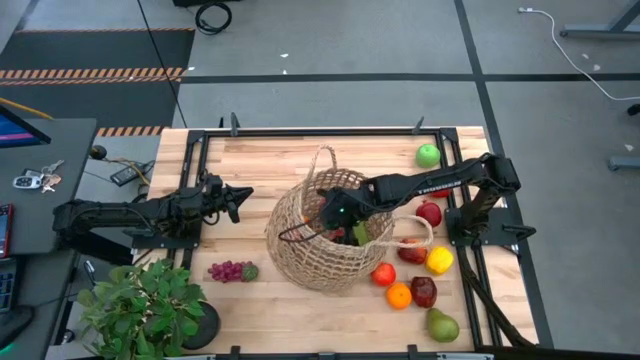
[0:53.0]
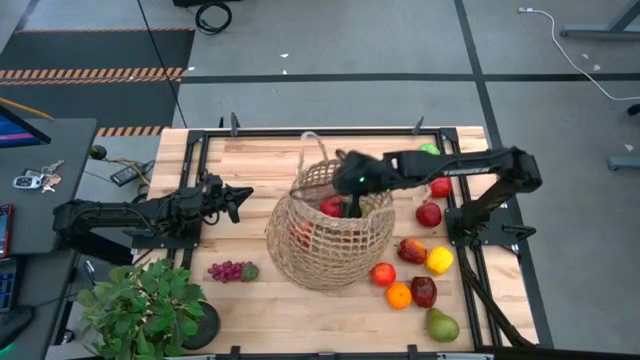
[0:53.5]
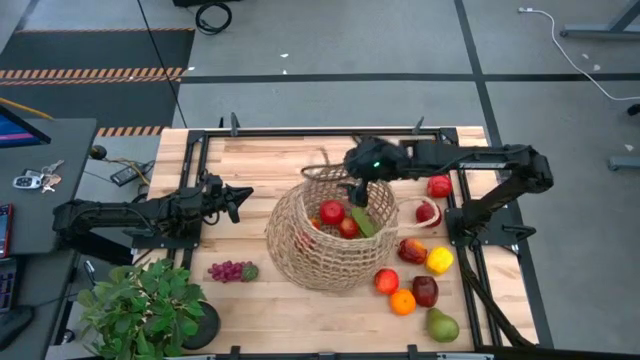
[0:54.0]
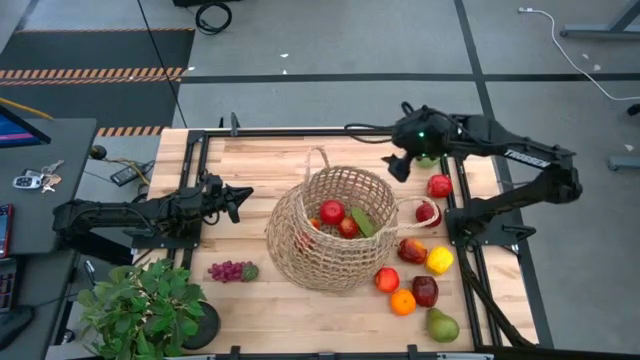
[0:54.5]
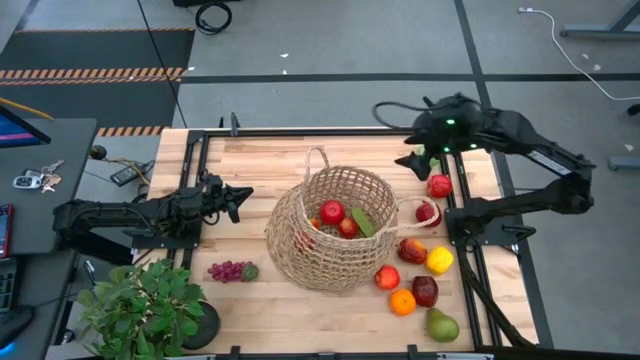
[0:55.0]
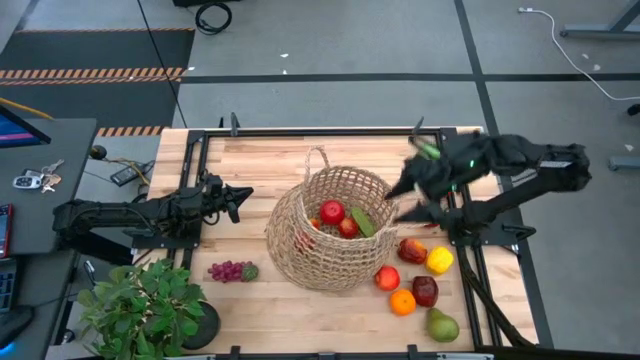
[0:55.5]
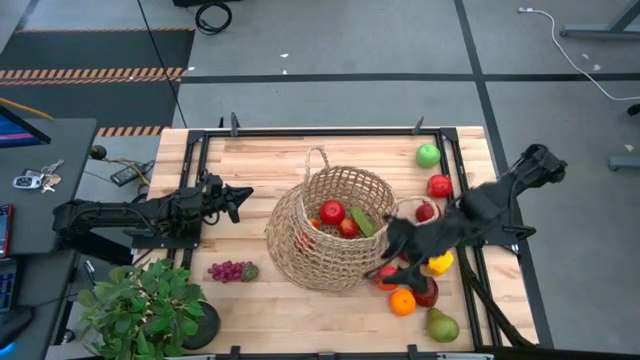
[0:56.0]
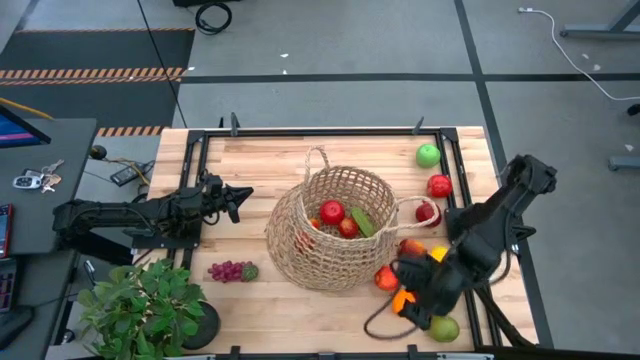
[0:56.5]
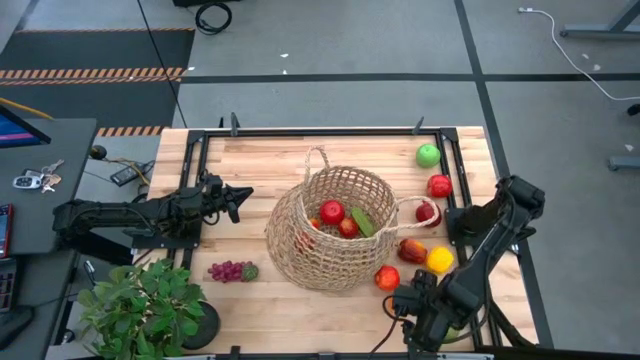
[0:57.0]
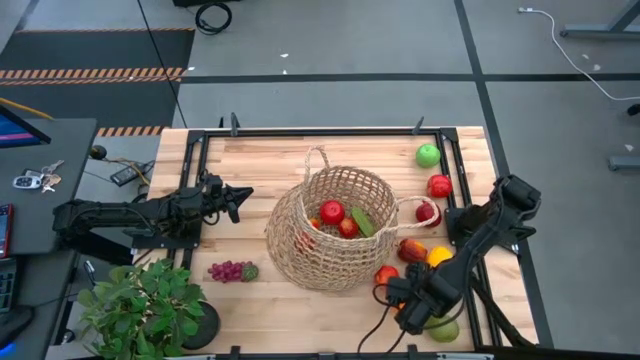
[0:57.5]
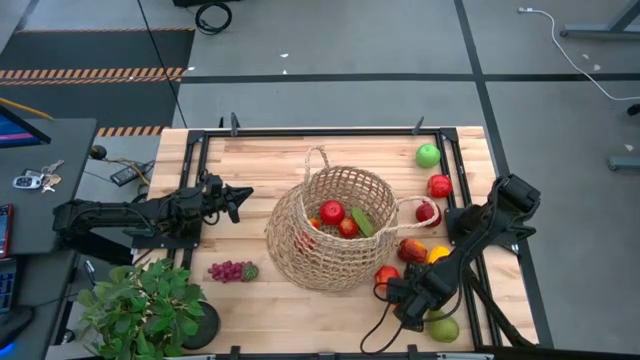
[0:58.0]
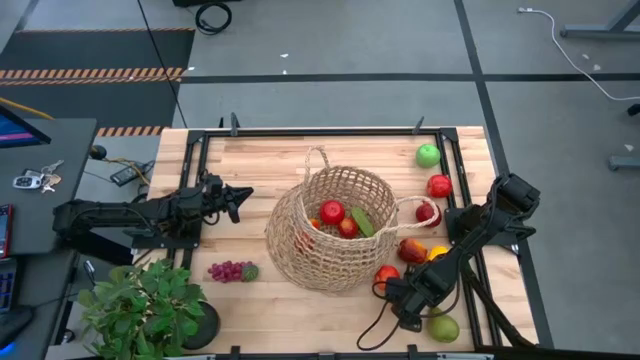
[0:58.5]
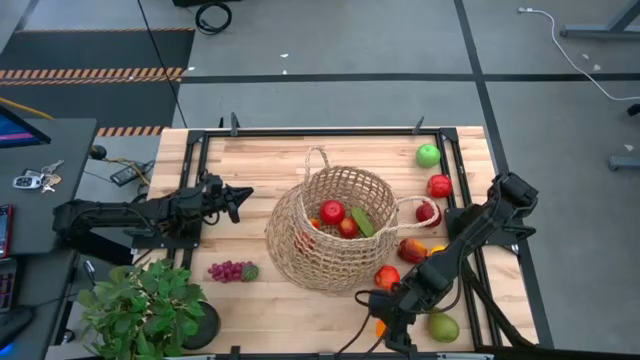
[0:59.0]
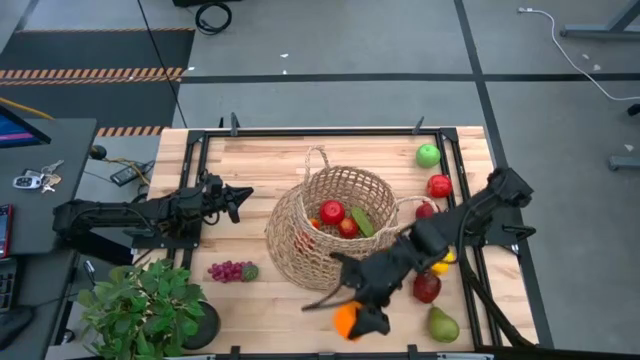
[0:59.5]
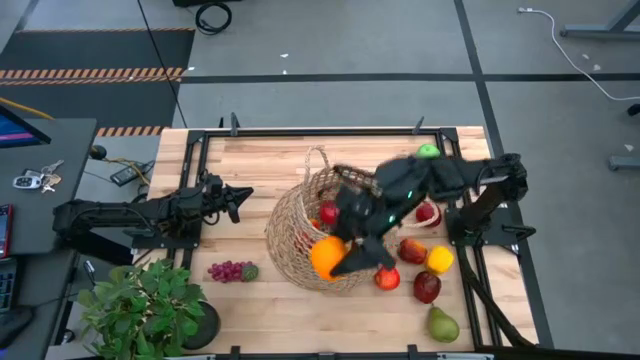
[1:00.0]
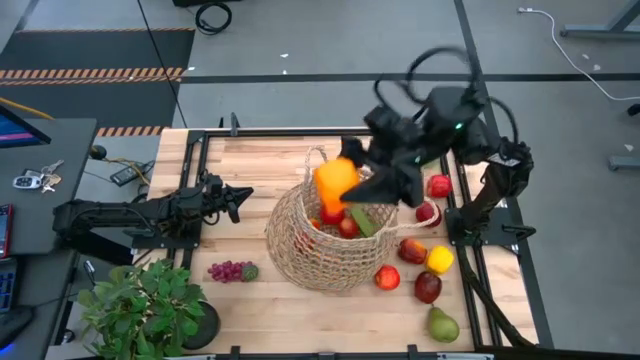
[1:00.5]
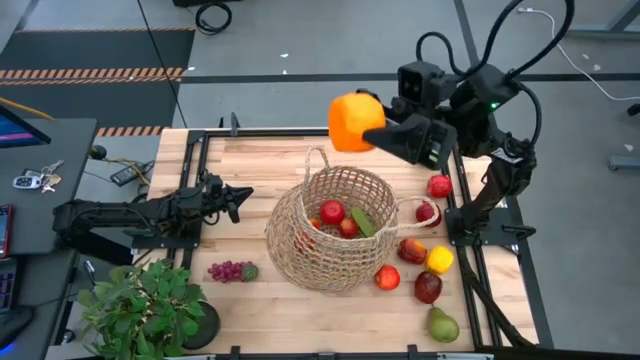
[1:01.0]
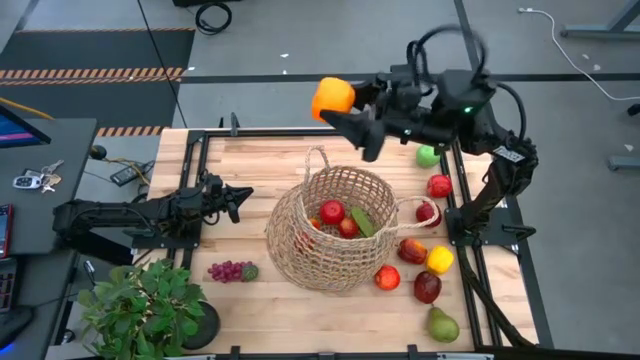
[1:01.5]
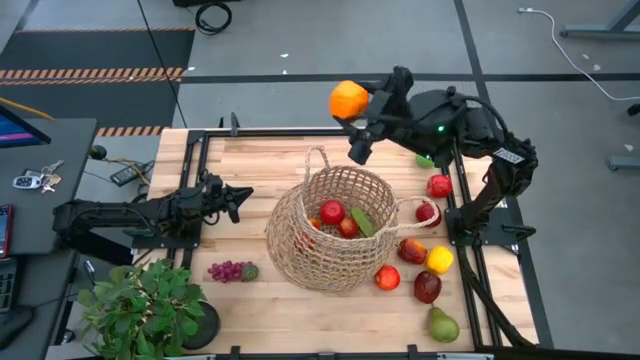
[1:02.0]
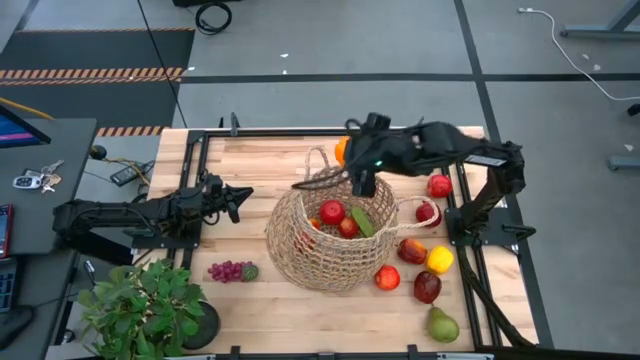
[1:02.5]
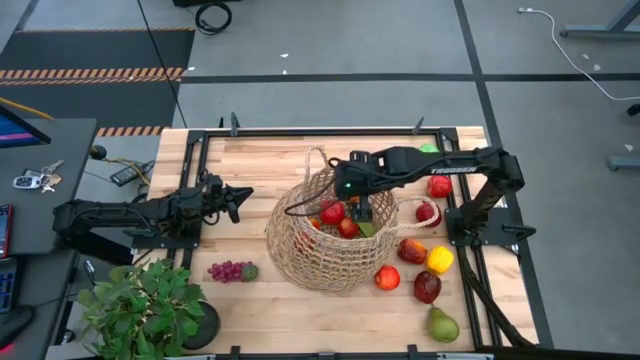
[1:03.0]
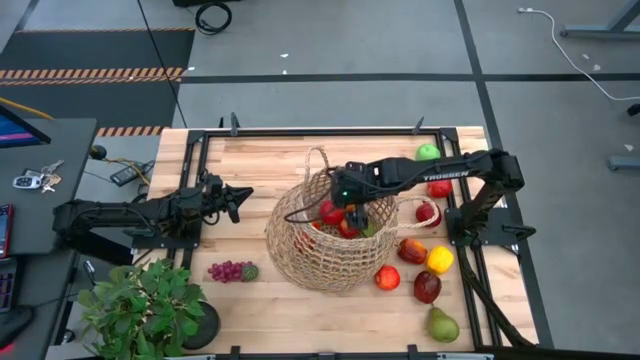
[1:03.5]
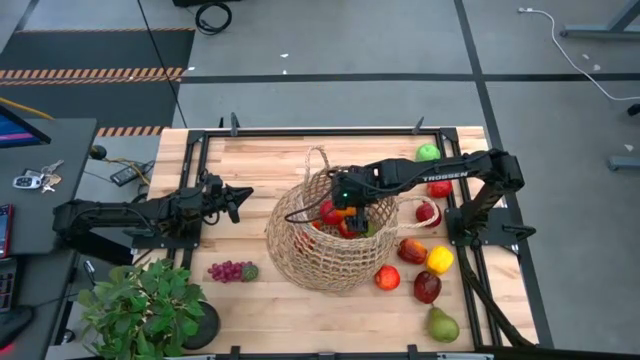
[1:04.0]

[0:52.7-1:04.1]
Task: Build produce basket
Put the orange into the brown basket

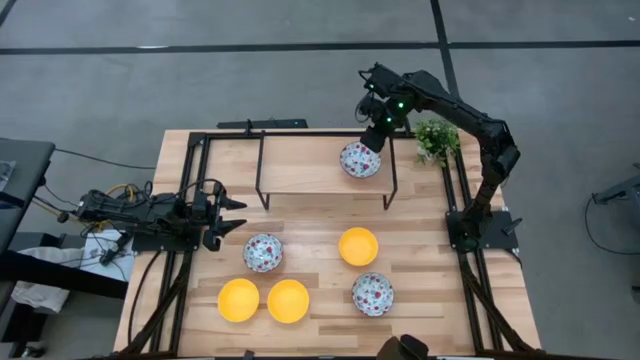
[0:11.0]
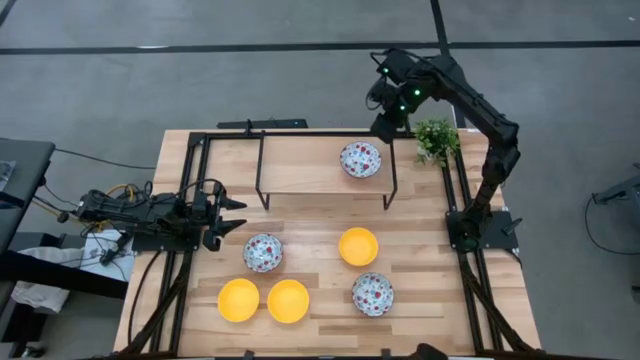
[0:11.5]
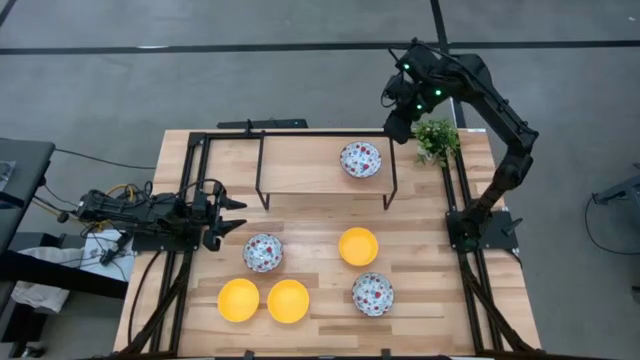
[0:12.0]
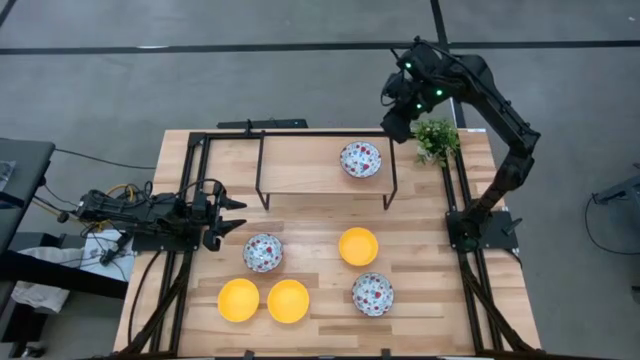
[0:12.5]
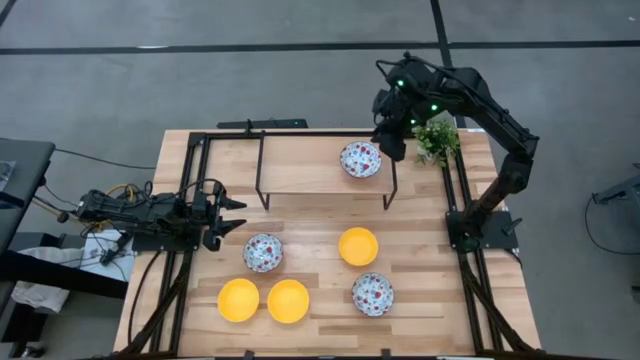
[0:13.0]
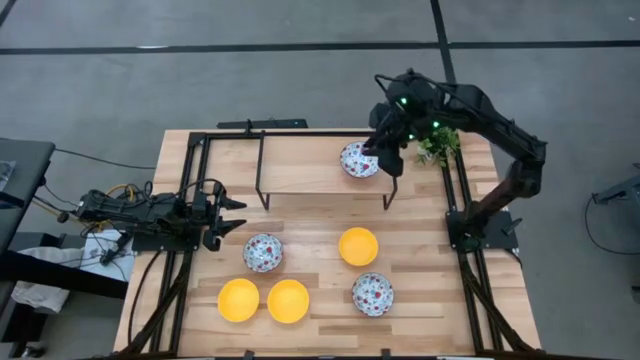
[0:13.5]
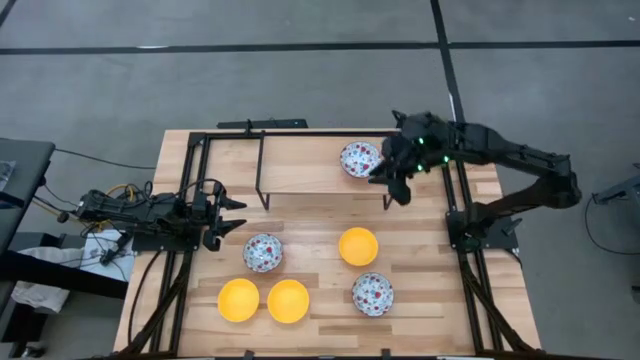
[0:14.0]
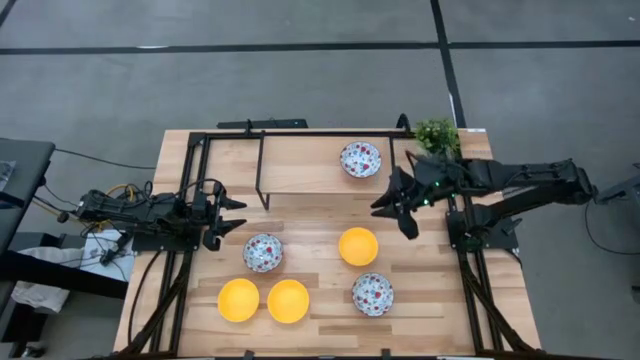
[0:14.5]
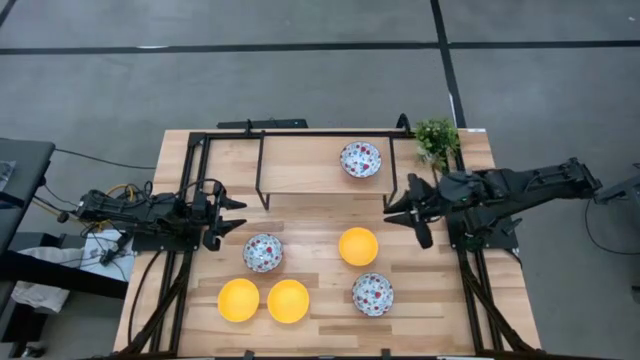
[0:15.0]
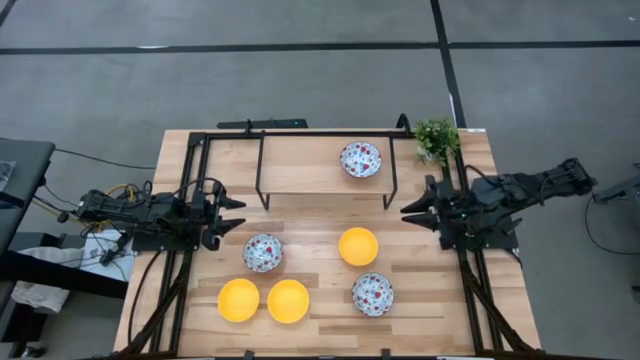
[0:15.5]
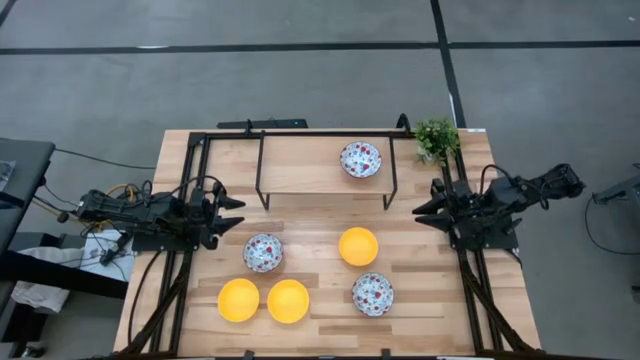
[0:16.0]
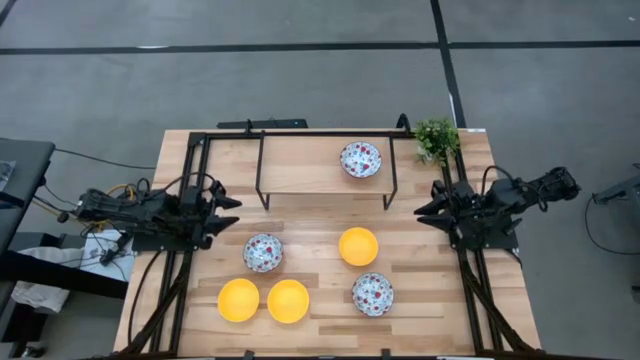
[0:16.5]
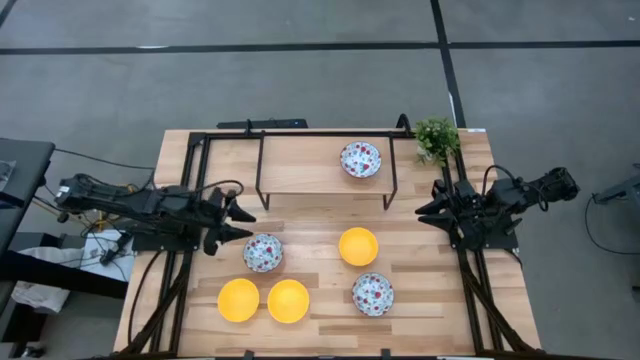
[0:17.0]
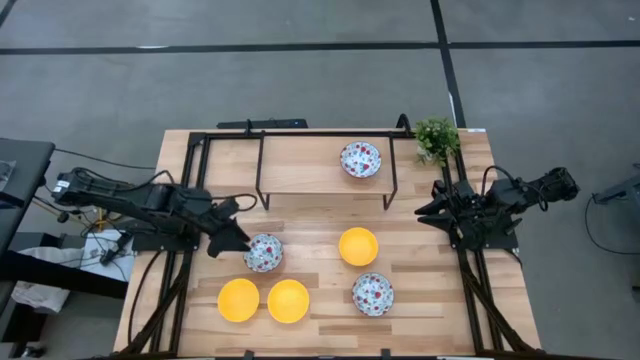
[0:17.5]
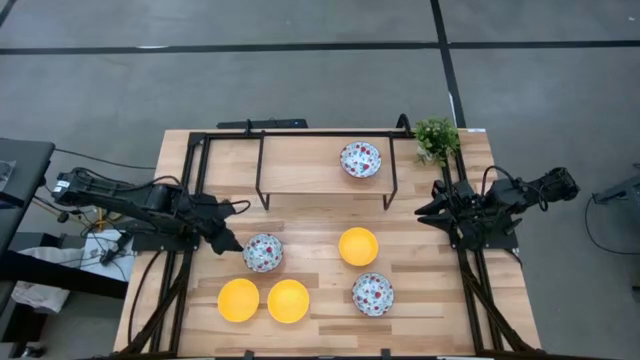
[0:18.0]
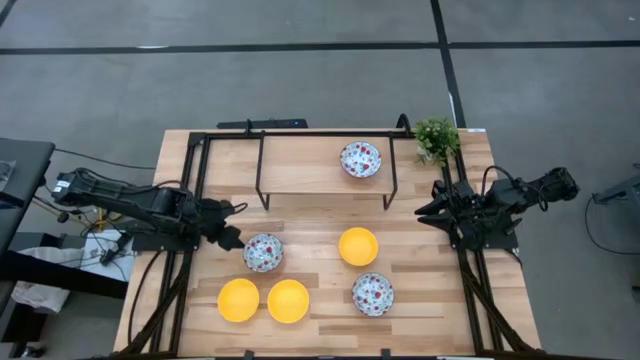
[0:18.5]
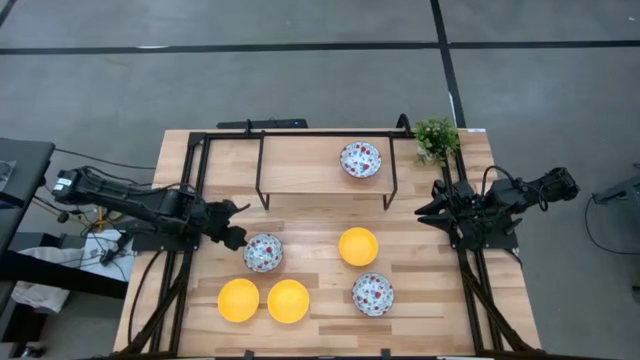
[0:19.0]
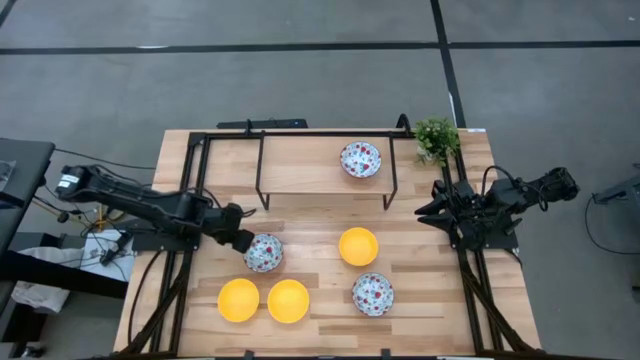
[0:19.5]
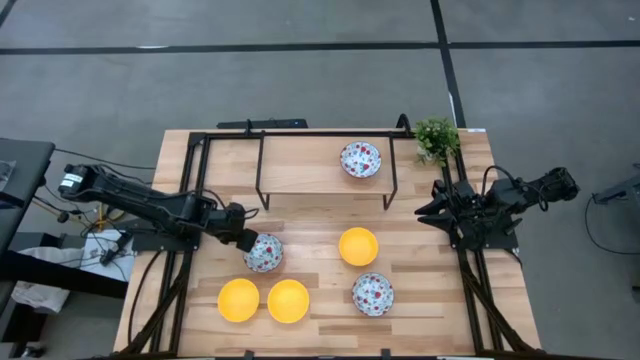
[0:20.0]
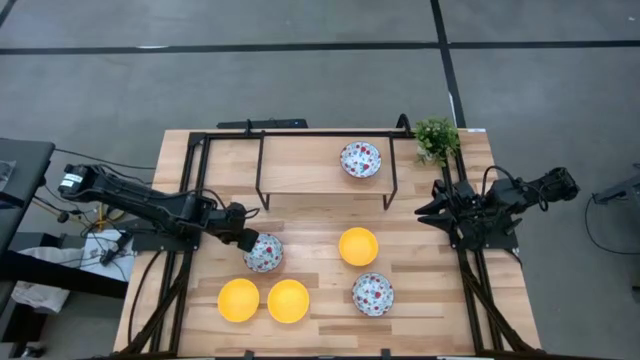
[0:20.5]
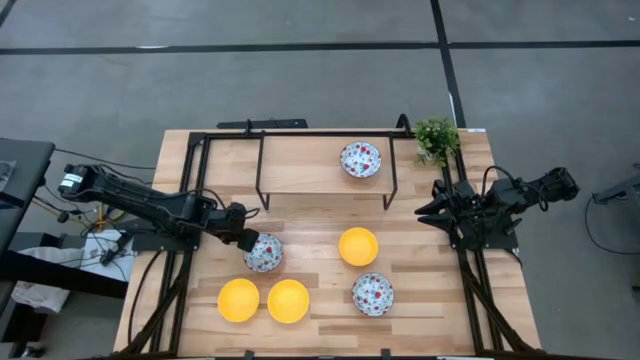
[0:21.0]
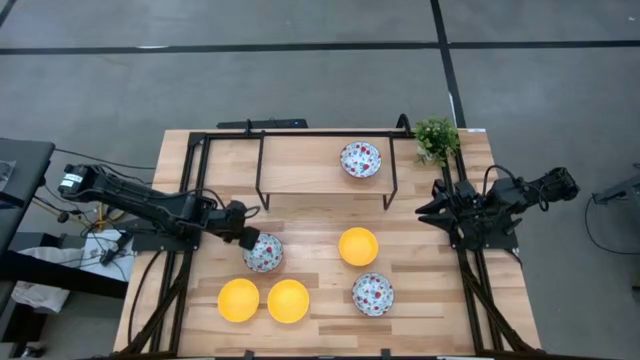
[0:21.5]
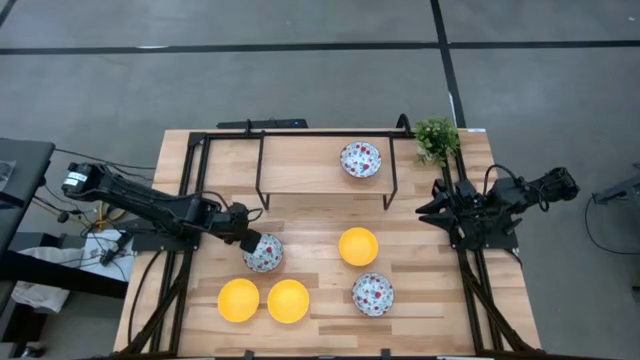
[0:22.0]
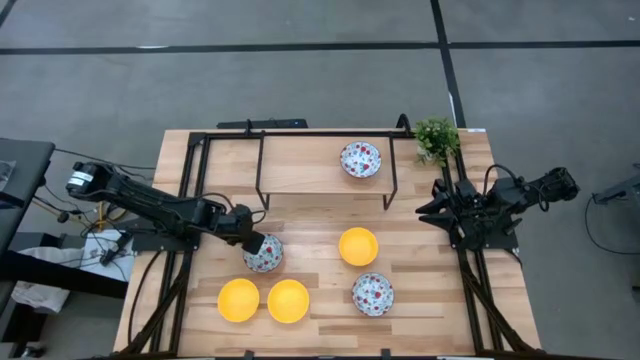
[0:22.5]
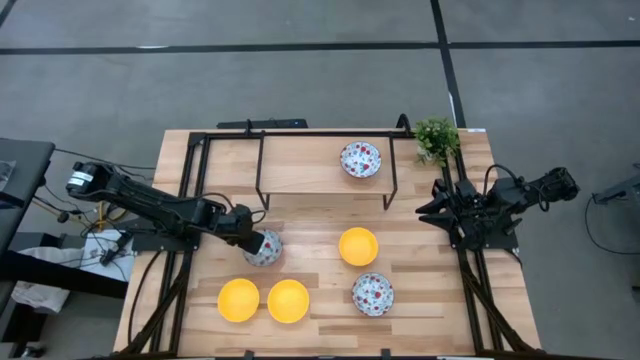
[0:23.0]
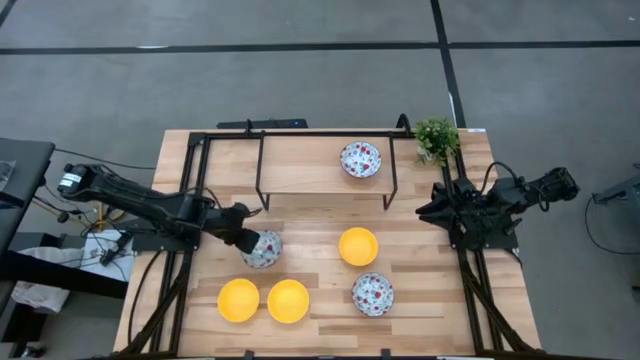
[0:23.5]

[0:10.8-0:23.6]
Task: Pick & Place Mini bowls
Stack the left red bowl on the red bowl on the shelf
